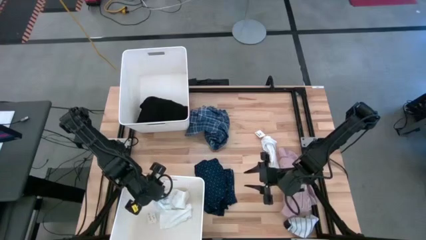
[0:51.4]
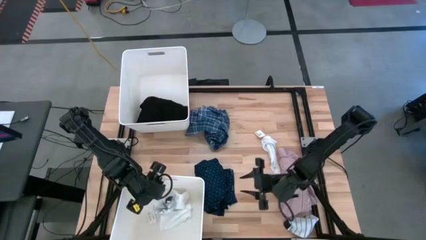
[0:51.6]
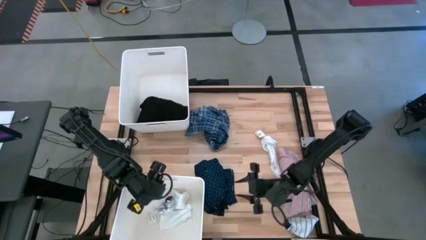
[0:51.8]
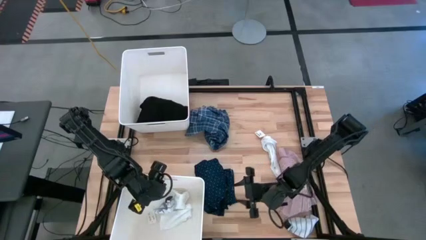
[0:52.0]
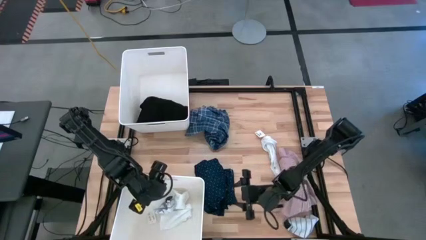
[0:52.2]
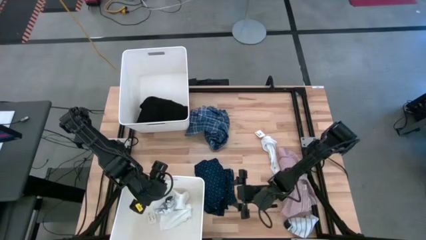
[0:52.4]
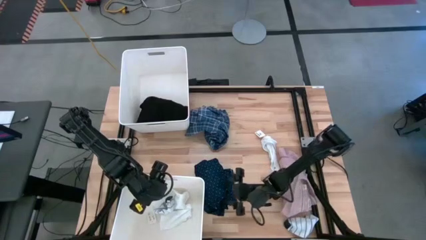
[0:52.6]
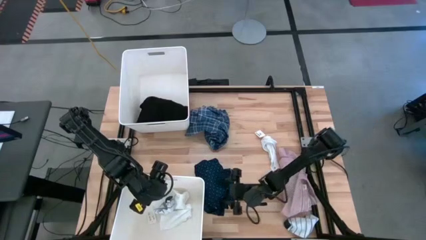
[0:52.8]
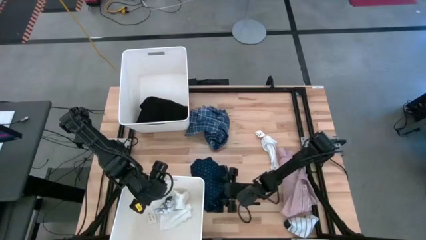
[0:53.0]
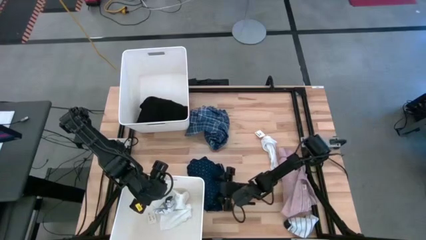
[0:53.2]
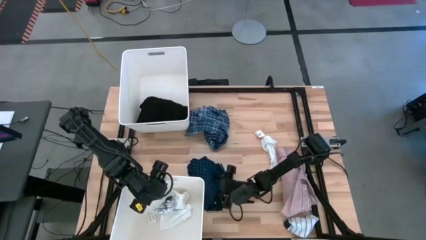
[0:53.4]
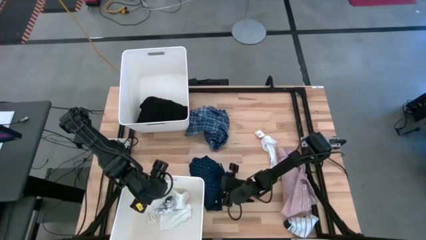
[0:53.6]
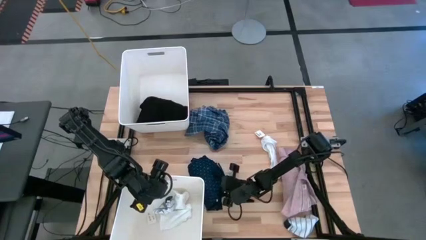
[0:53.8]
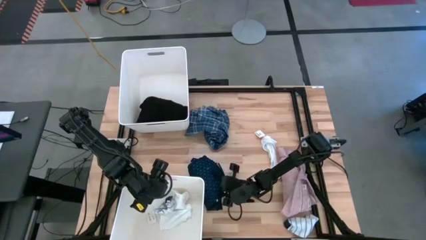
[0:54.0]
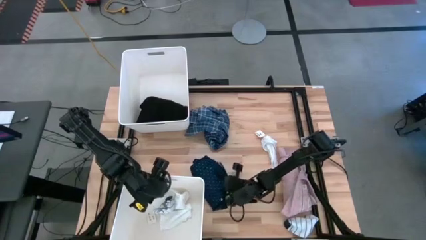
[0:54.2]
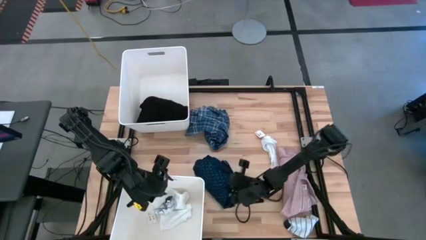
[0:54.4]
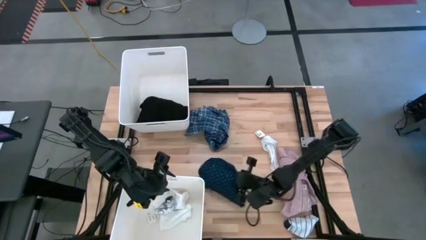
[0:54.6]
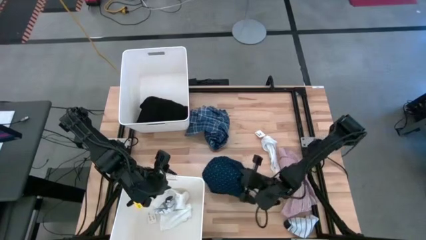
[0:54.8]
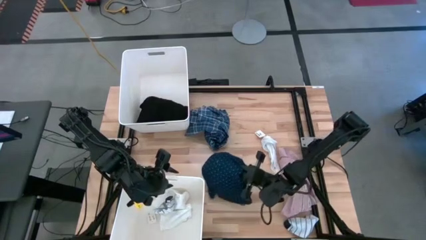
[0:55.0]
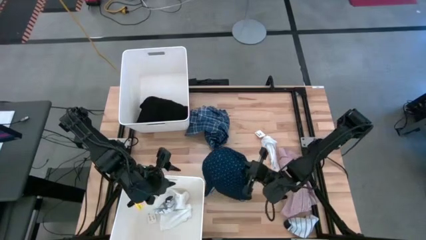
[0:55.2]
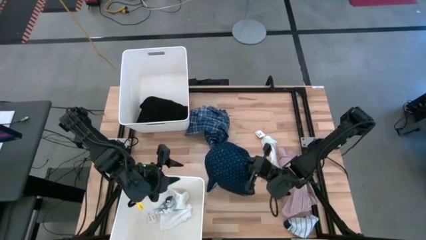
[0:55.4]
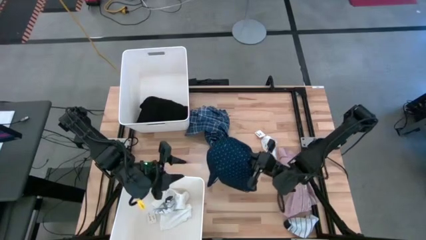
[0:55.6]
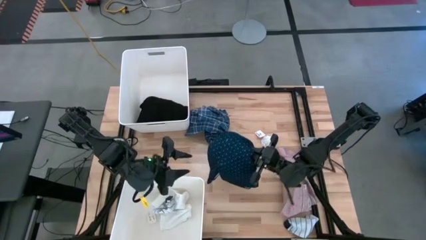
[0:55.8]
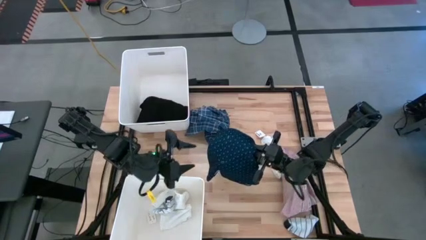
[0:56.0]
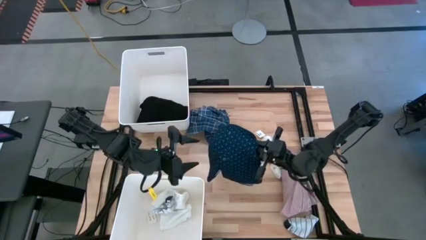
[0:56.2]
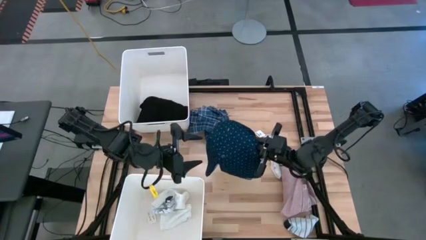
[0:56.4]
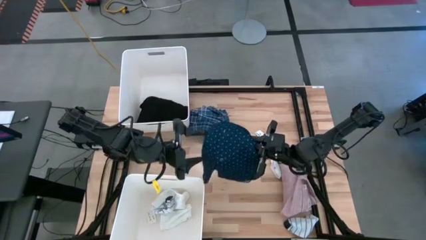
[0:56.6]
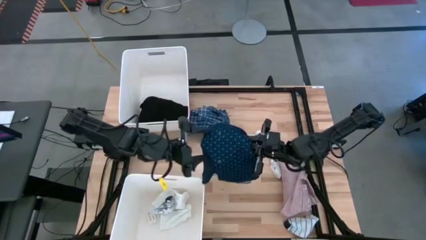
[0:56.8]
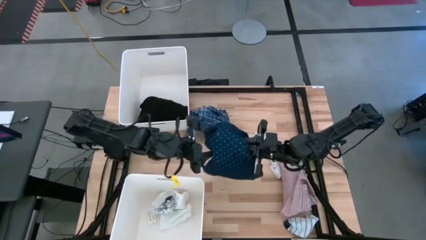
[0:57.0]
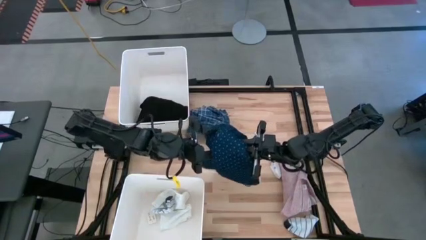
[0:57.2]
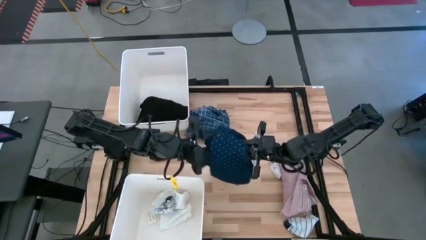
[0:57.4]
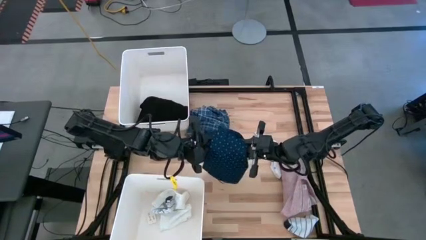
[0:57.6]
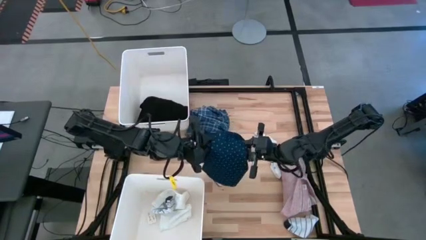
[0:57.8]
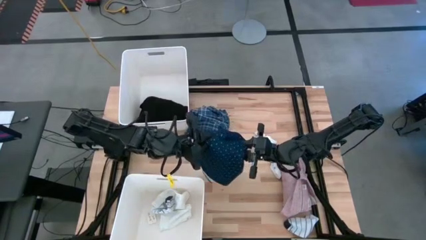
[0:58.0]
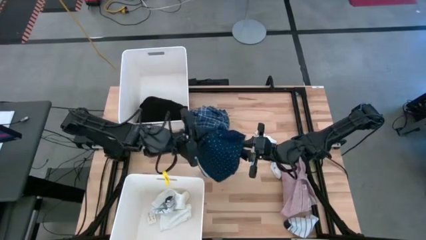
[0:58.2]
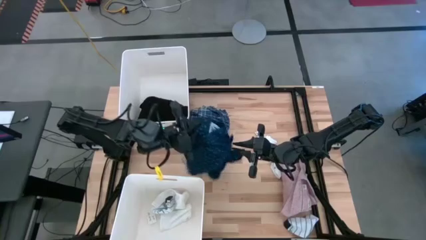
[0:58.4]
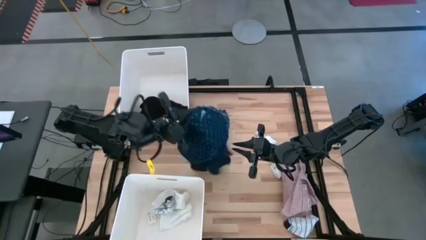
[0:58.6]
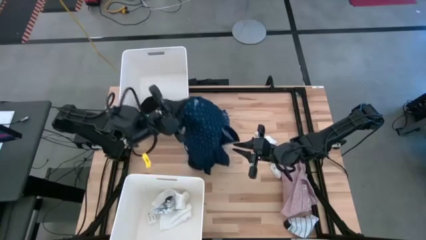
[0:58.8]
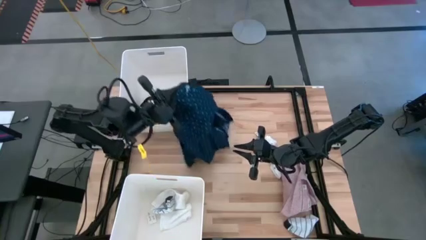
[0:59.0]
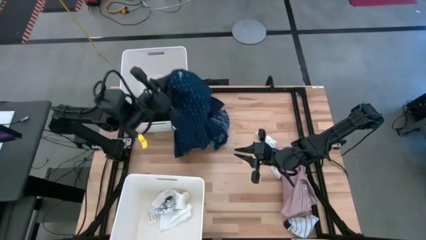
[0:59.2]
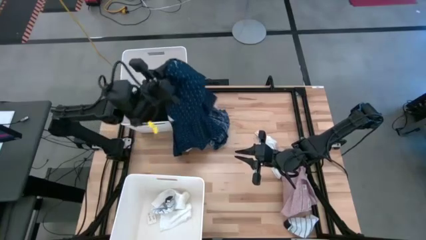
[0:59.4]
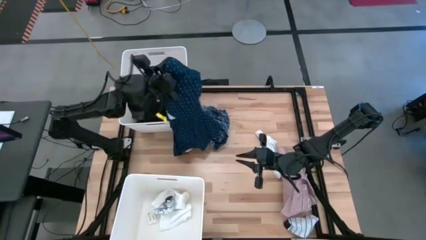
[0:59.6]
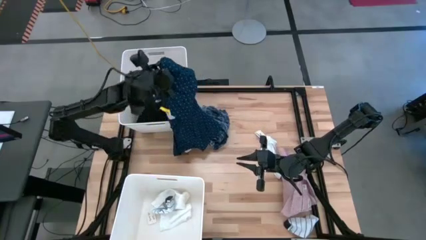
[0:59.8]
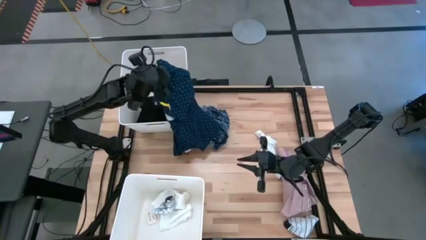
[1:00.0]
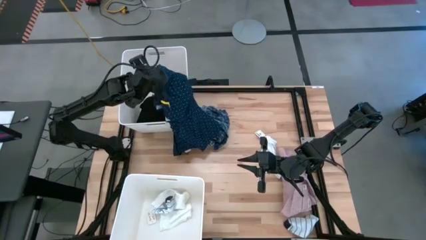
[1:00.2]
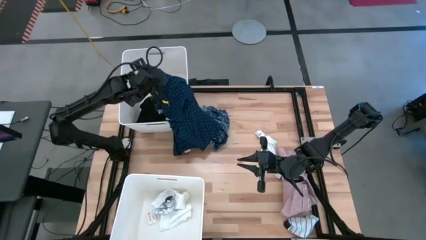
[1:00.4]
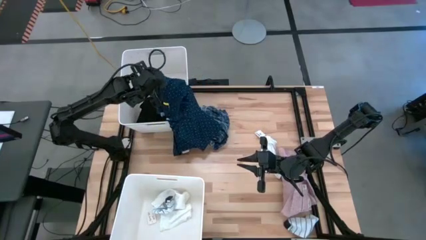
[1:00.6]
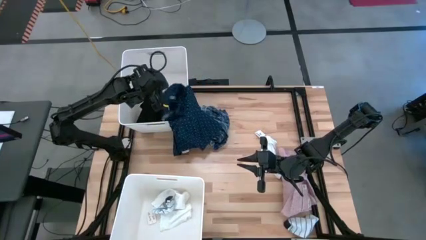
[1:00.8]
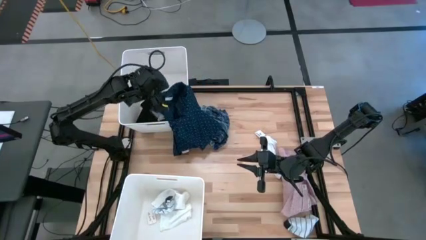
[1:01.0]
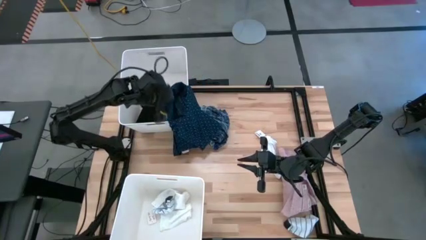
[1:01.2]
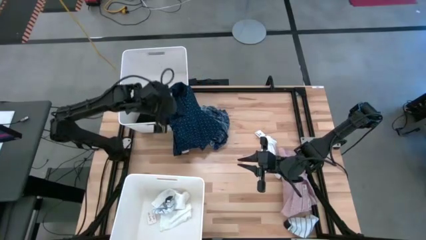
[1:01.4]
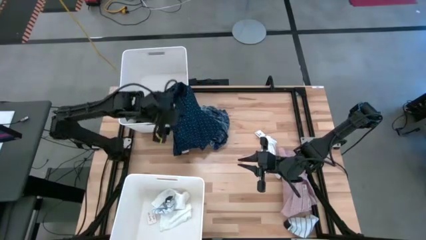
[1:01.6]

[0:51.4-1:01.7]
Task: Sort clothes
Put the blue shirt into the top white bin

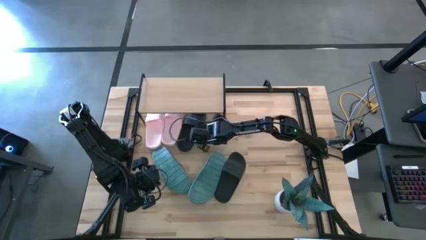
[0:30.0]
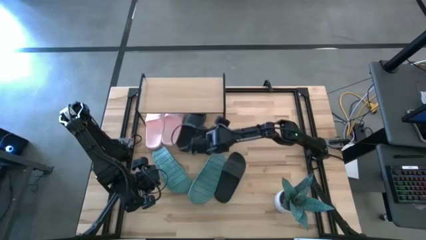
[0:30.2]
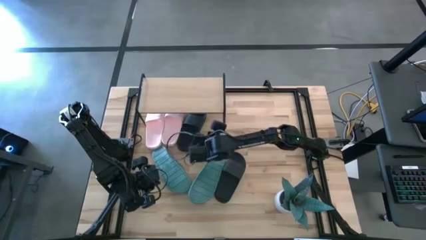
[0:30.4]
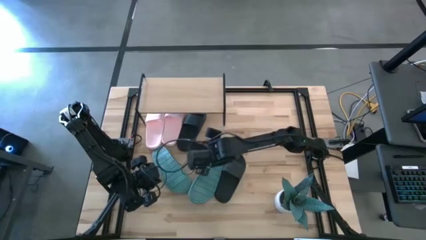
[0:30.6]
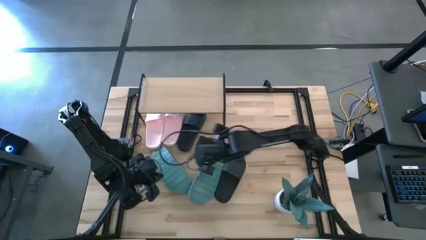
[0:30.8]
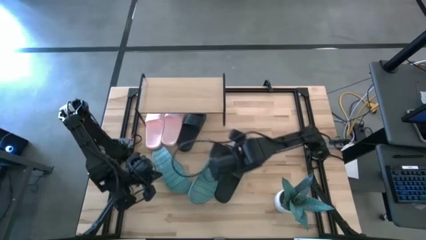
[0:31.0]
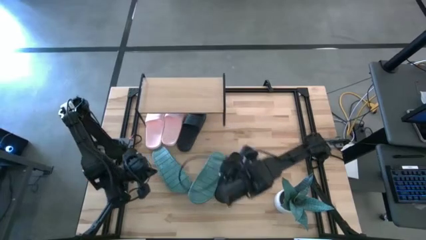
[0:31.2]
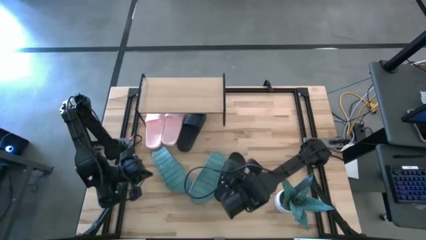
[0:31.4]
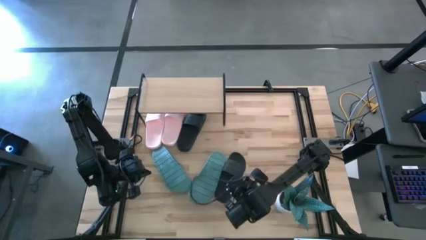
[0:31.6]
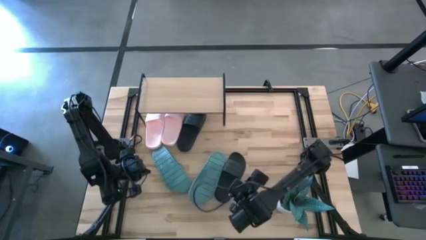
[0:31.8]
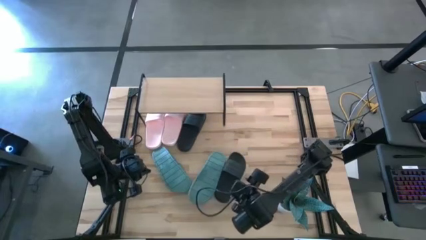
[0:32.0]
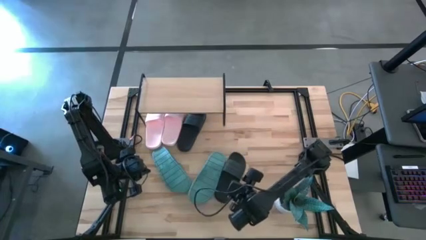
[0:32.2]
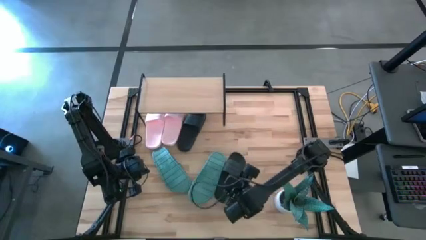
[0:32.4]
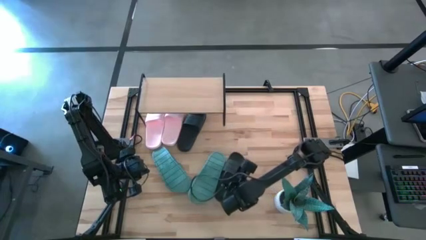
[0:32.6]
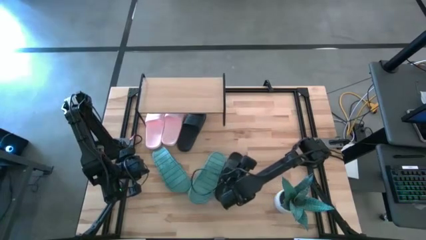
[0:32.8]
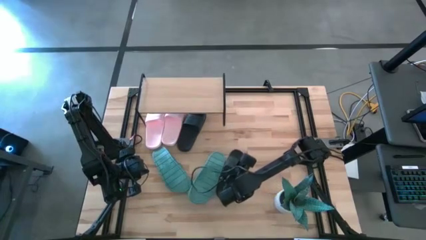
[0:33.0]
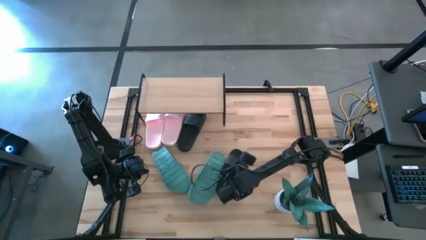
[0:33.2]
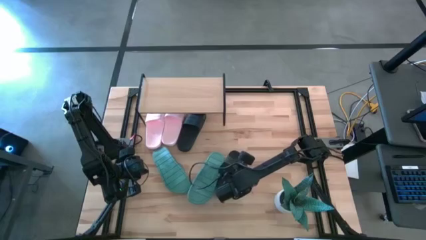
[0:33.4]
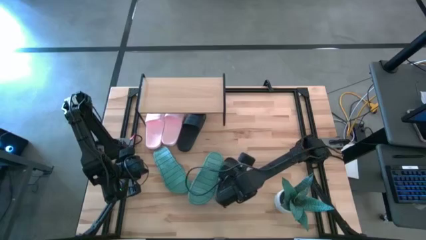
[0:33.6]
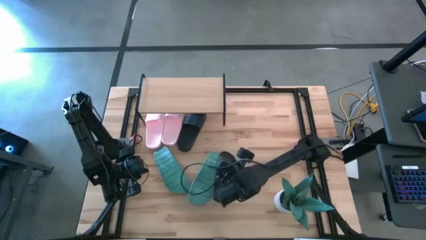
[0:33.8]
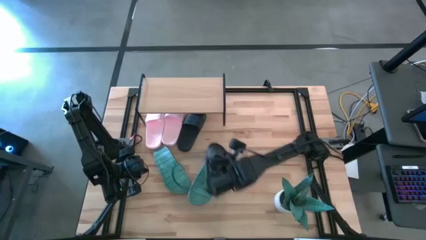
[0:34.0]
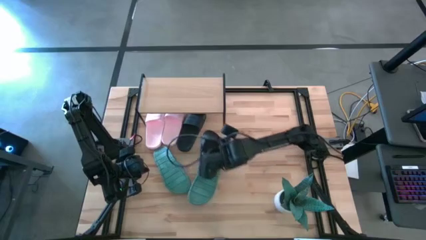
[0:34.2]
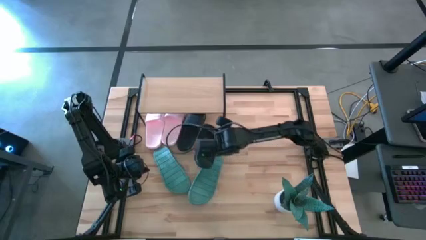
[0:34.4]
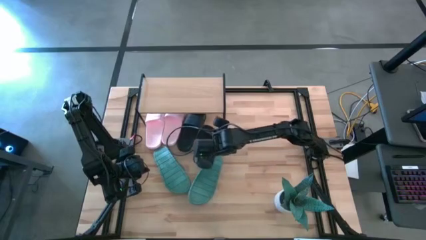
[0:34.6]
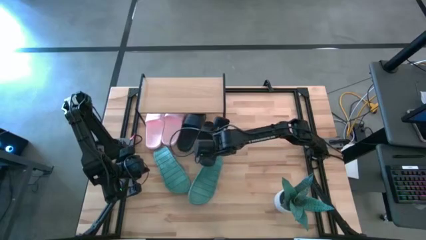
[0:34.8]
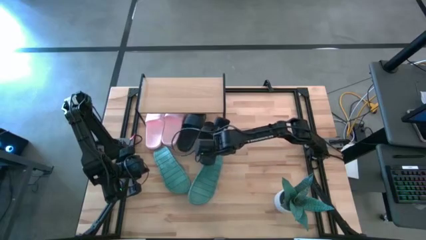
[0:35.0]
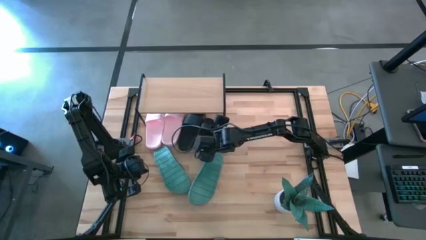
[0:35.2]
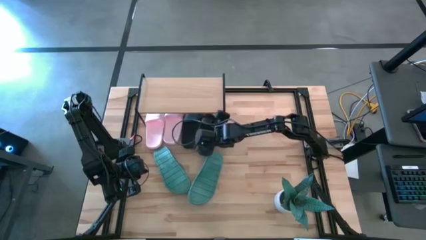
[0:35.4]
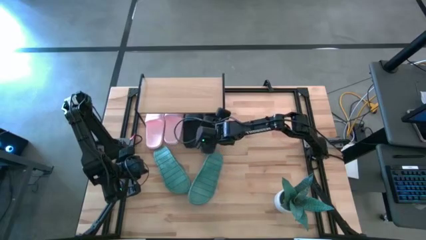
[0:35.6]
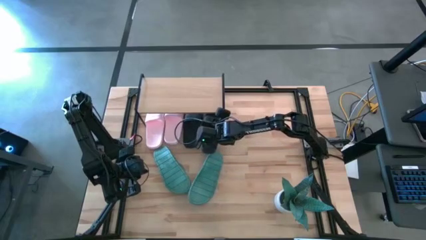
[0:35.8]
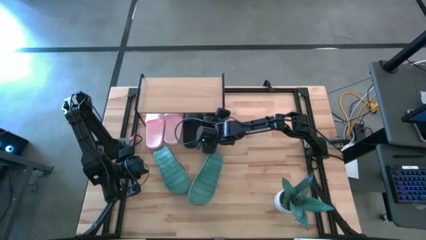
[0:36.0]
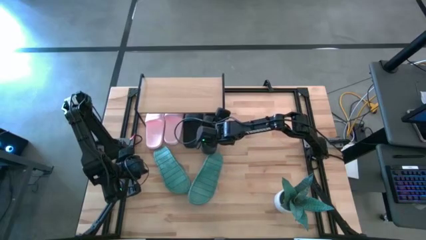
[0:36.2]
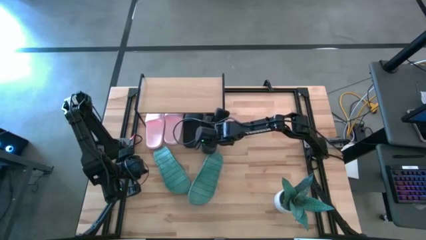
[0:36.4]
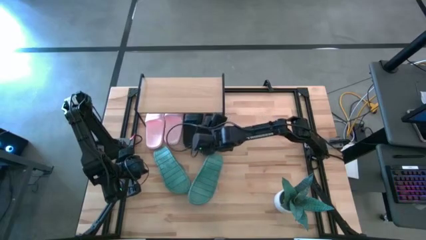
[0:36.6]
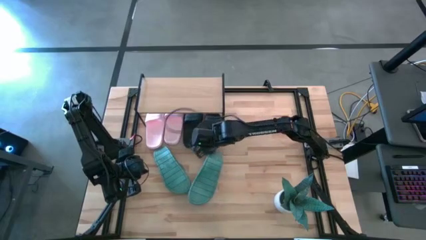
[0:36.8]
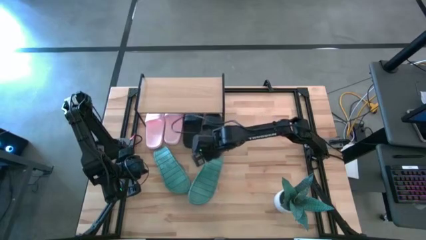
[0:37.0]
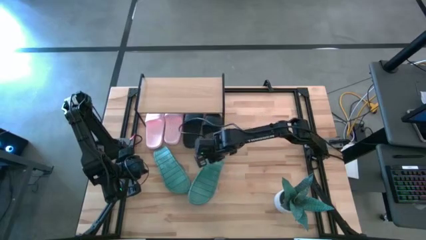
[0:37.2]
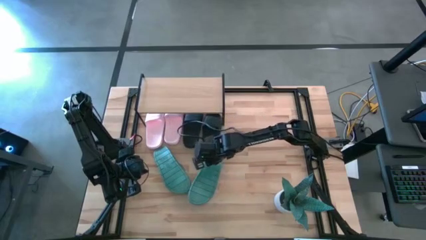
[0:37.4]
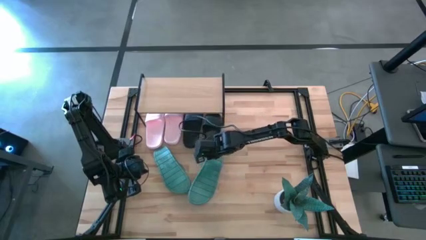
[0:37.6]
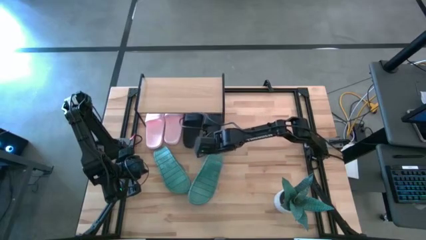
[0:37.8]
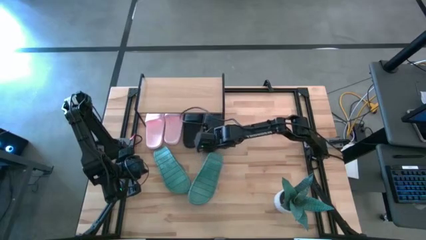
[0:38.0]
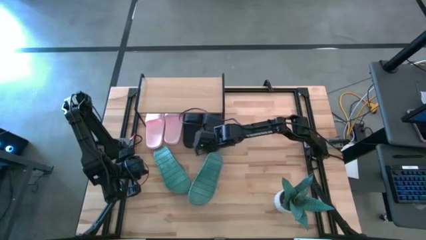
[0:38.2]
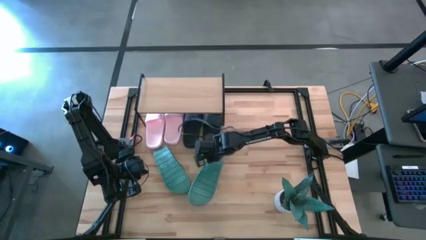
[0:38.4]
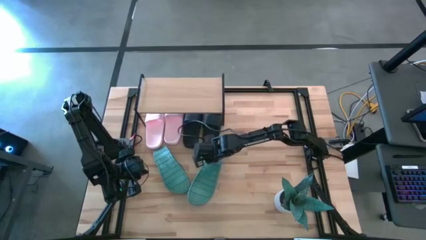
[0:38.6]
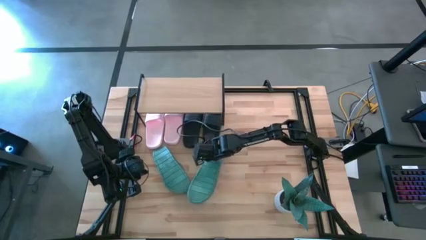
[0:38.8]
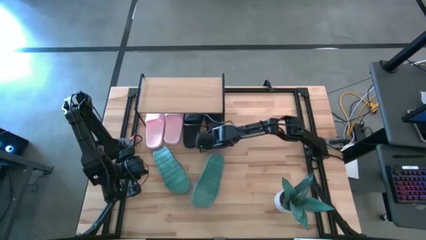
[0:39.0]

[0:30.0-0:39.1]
Task: Pick and place slides into the shelf
Put the black slide under the shelf
